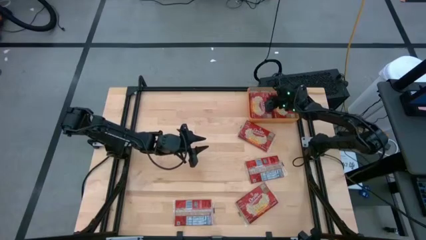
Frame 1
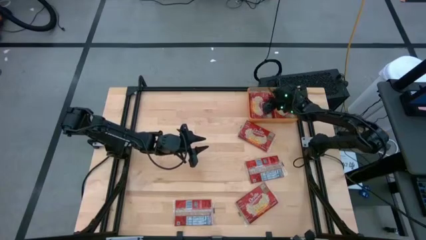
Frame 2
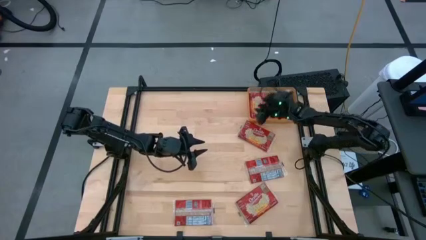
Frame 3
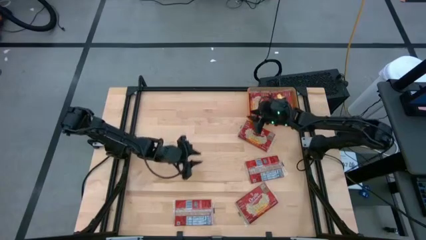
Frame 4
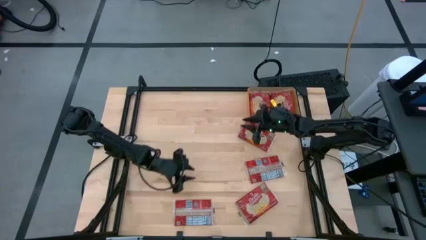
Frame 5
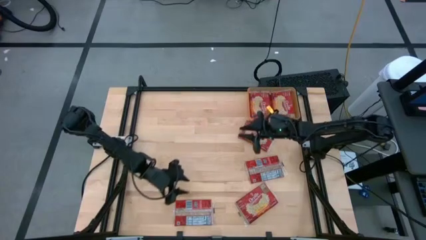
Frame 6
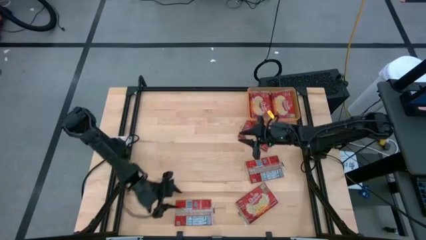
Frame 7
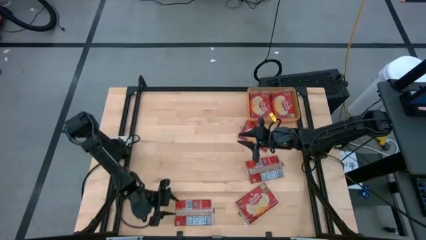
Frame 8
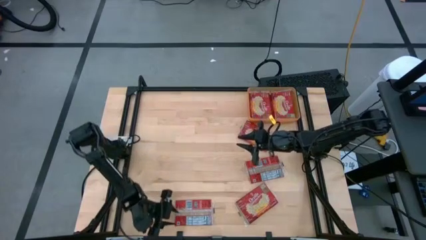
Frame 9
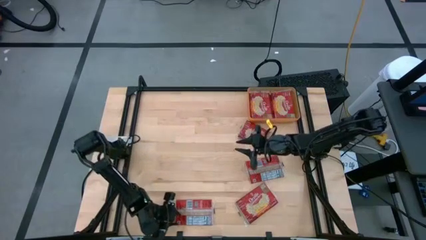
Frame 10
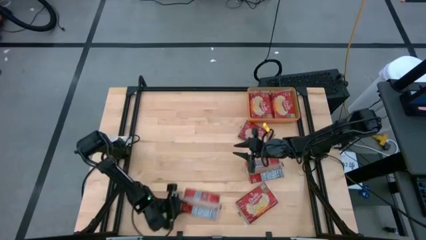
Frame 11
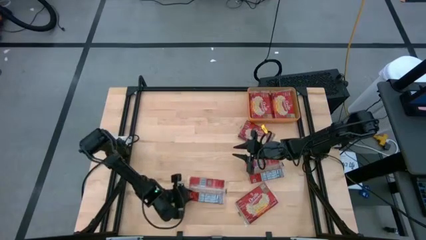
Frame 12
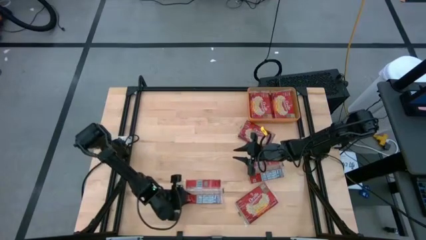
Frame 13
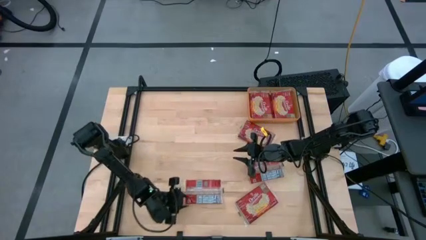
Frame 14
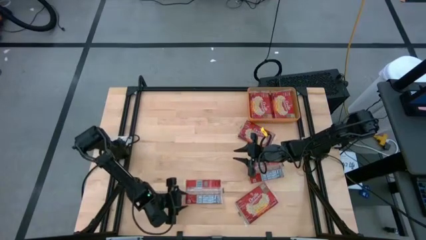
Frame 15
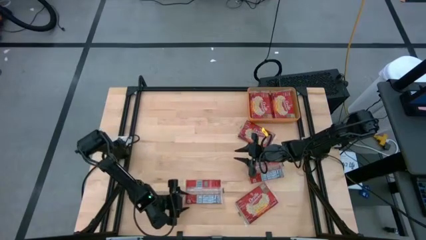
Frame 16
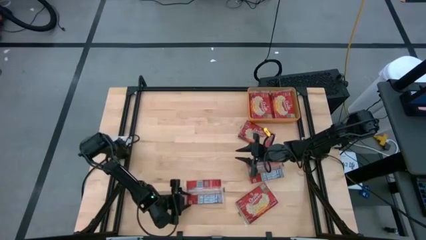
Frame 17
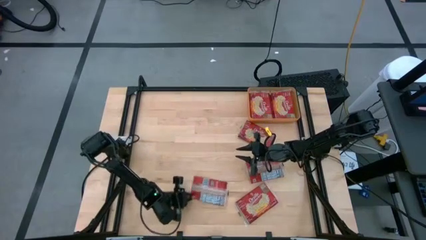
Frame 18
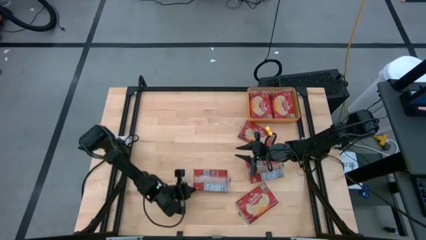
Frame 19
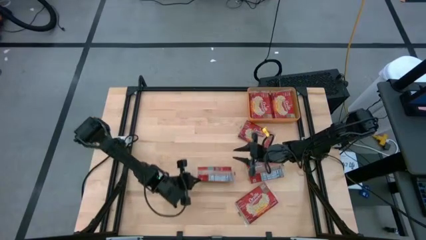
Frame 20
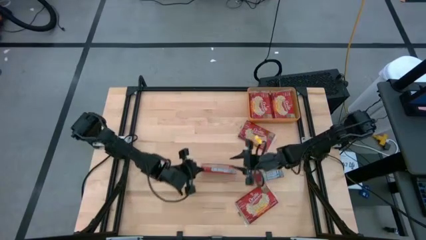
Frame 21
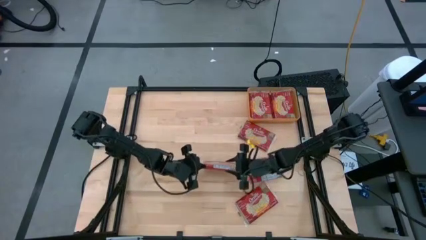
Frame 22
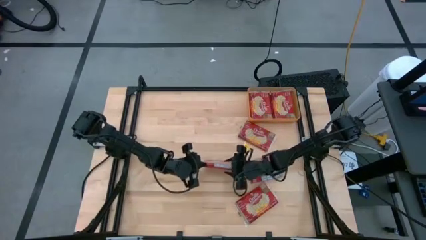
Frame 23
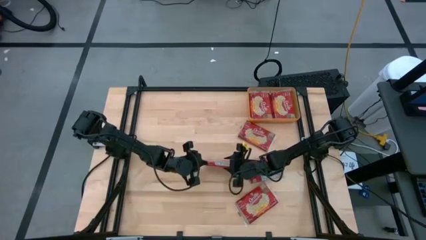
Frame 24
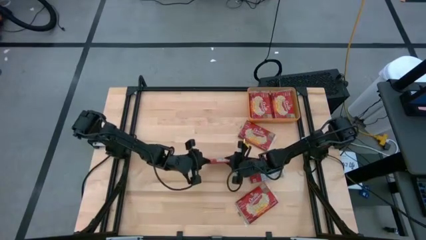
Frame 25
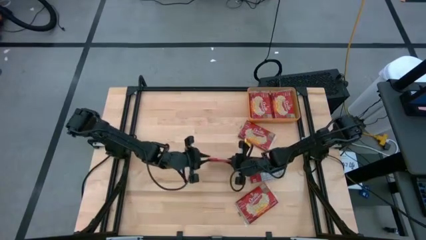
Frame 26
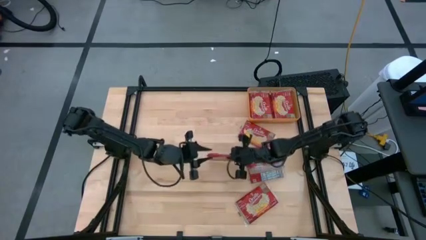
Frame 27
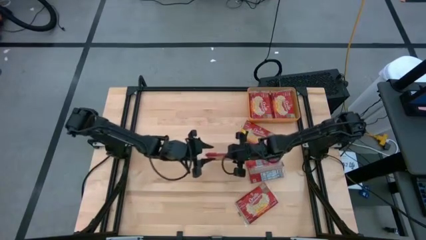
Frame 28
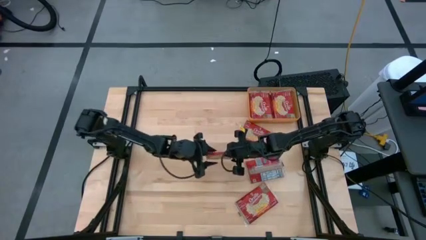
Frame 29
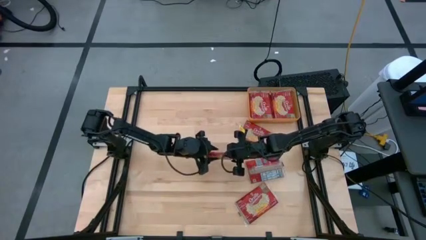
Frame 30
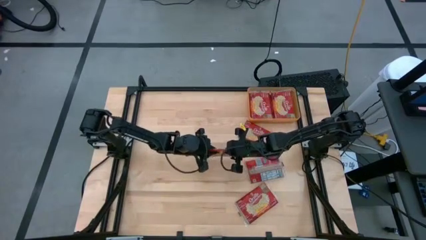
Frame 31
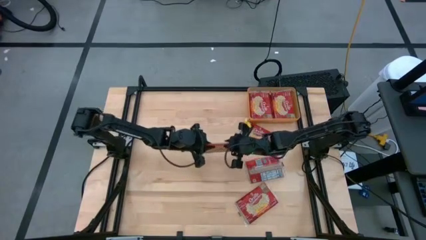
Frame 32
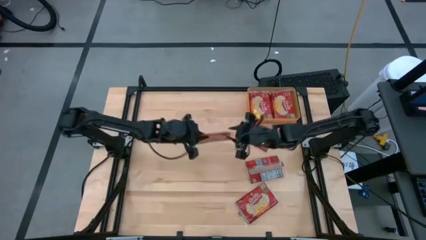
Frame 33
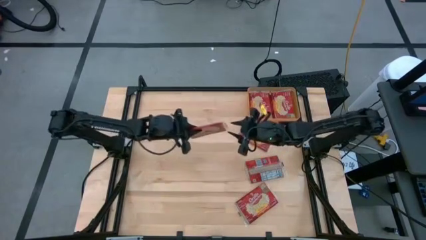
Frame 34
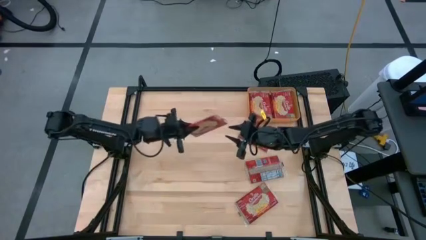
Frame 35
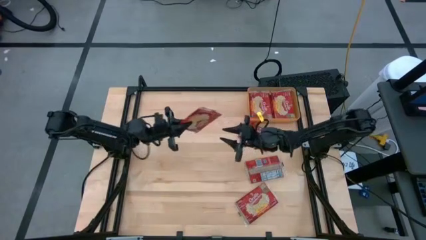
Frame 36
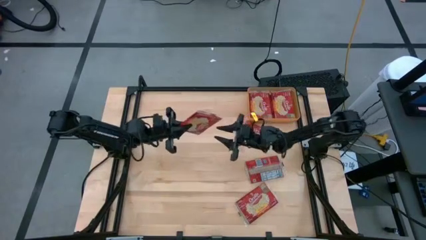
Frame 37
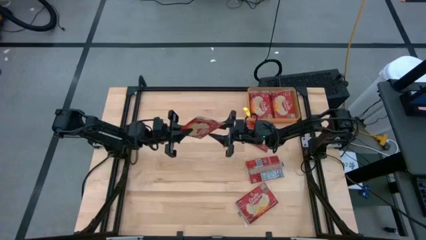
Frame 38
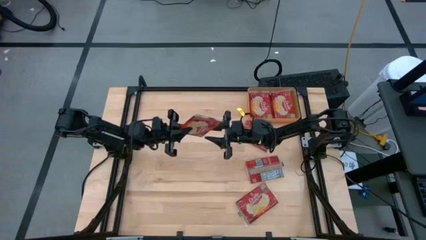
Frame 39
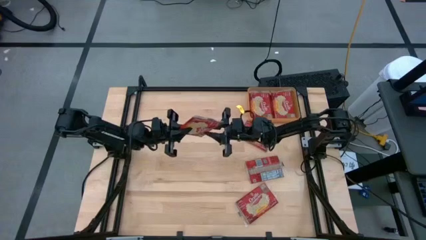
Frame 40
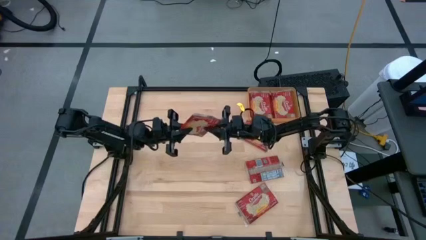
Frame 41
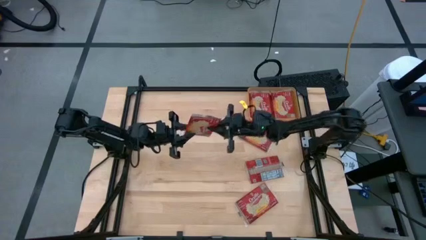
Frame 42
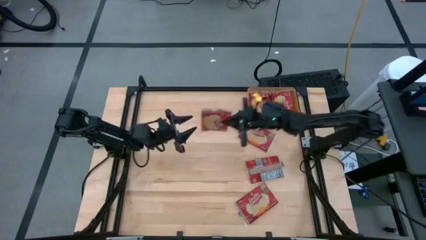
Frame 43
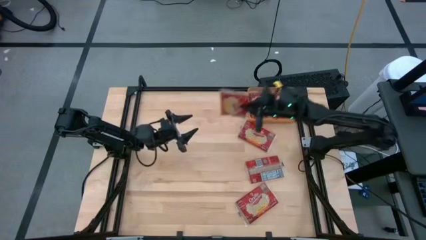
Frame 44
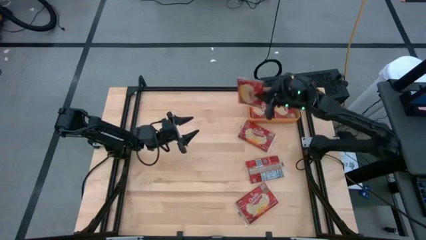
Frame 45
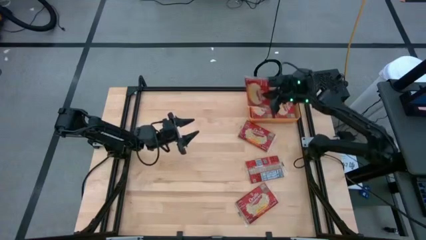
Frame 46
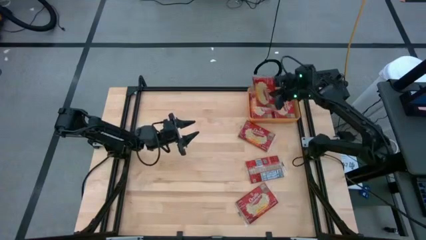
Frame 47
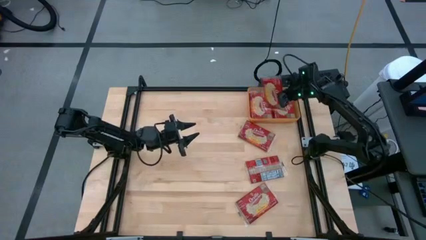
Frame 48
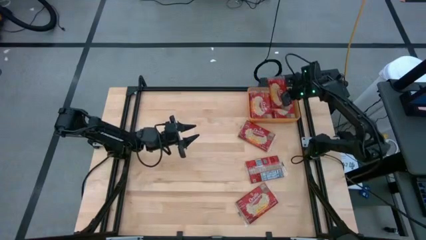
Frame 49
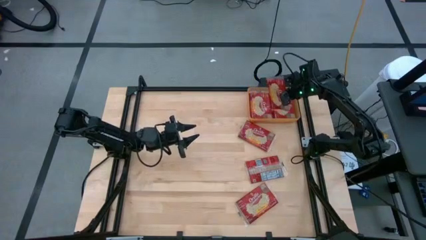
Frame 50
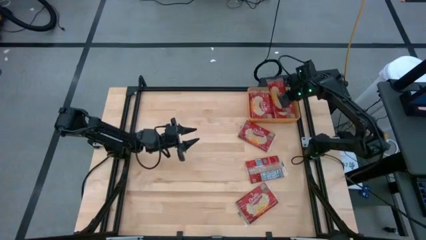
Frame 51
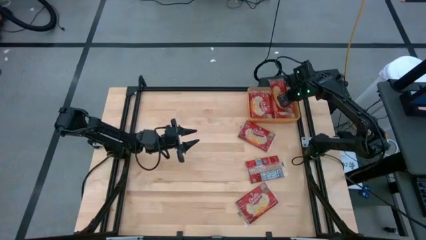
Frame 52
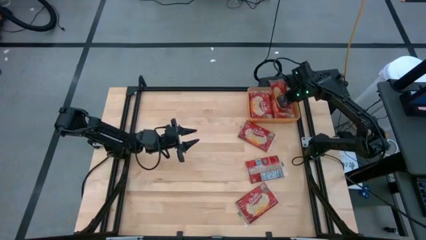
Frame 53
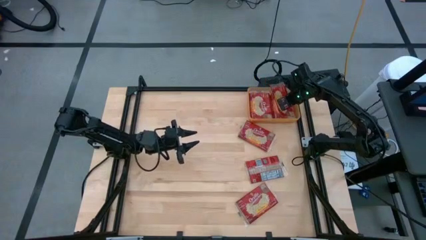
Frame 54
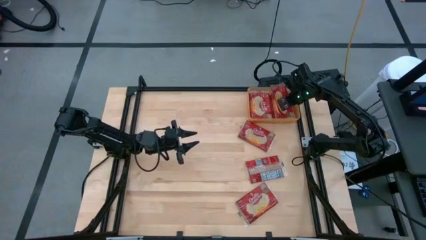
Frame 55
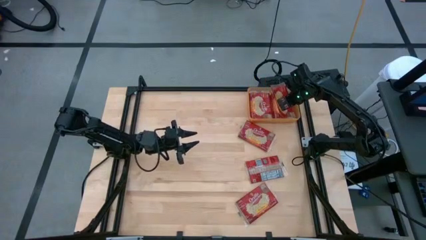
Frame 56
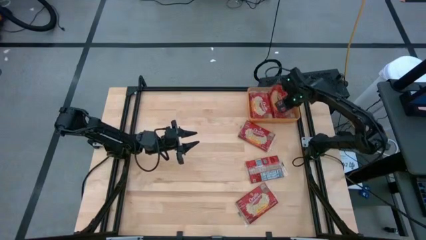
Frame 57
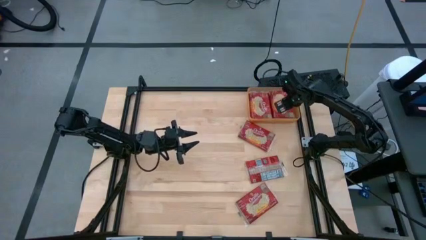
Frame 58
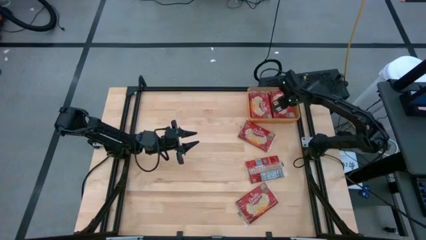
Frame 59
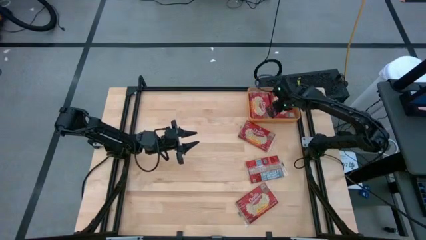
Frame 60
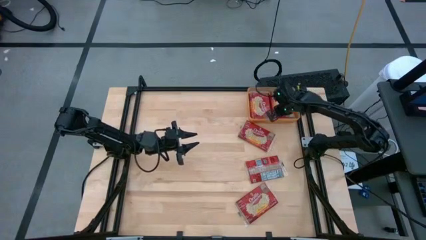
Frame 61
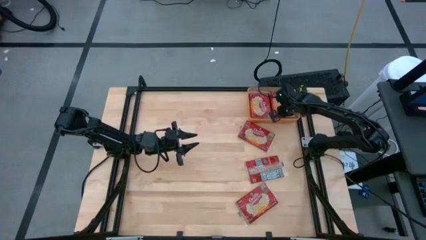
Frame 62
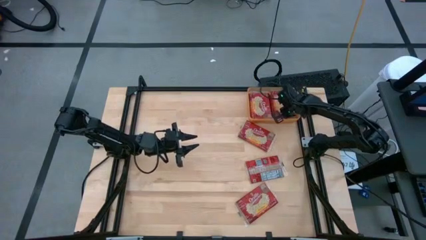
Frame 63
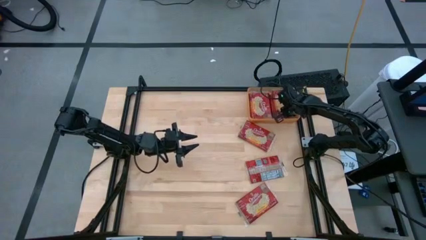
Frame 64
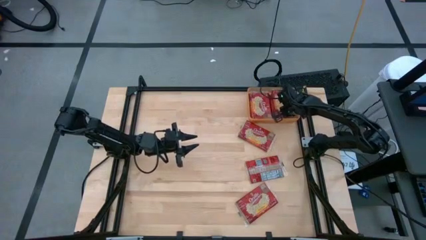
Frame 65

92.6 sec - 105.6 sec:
Task: Sort popcorn bags into baskets
Put the red popcorn bag into the orange bin

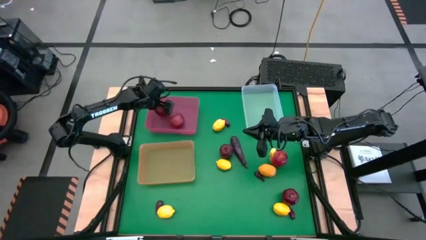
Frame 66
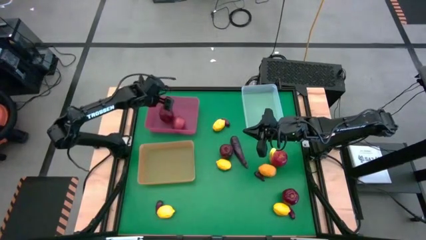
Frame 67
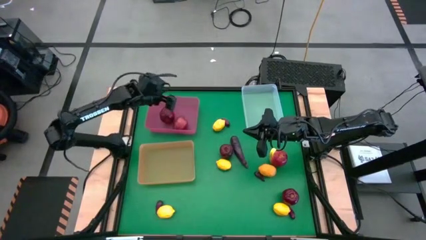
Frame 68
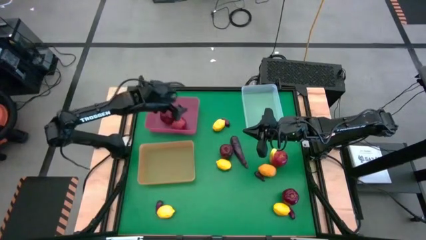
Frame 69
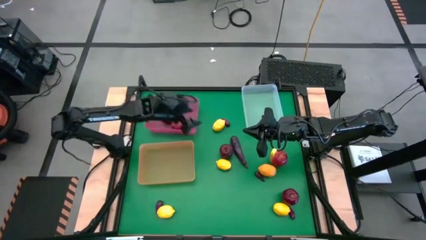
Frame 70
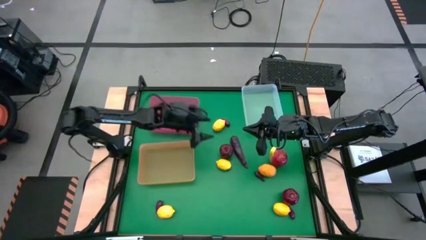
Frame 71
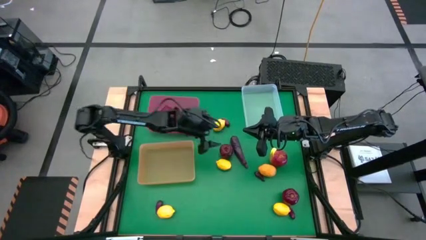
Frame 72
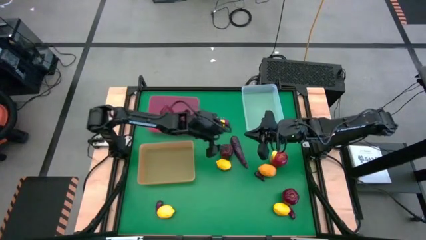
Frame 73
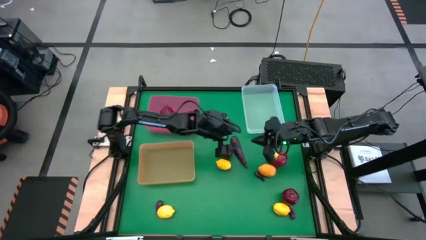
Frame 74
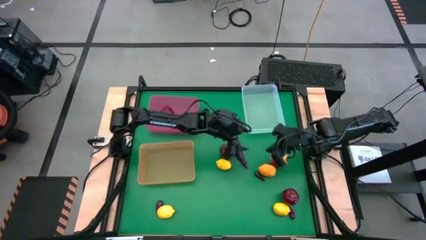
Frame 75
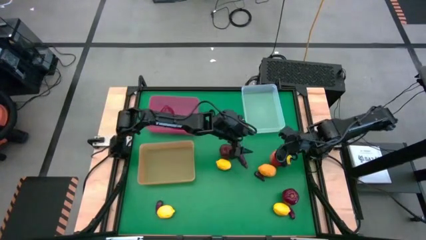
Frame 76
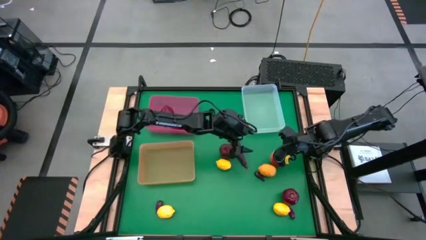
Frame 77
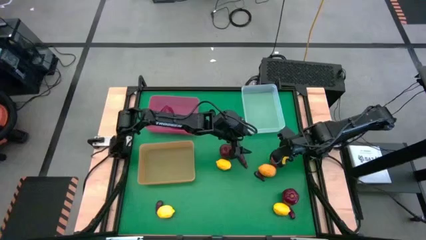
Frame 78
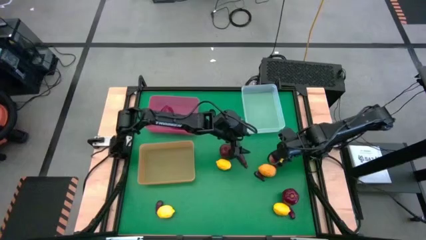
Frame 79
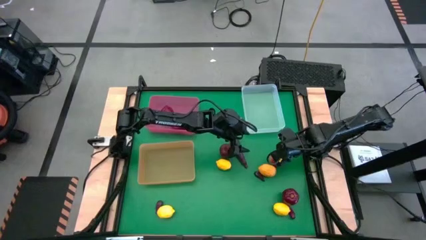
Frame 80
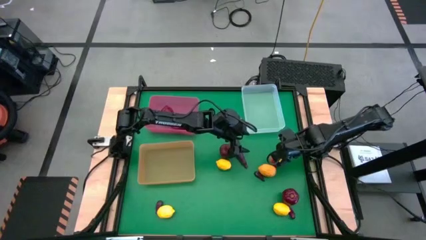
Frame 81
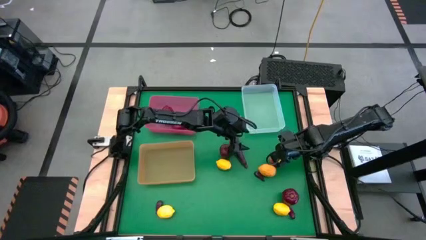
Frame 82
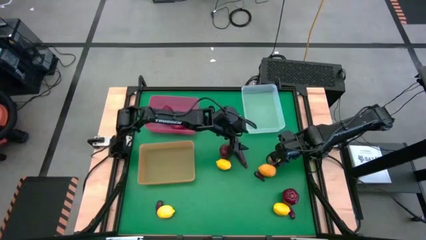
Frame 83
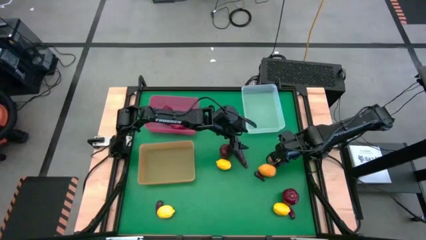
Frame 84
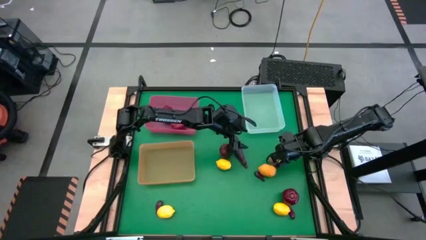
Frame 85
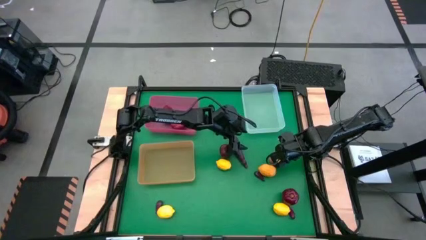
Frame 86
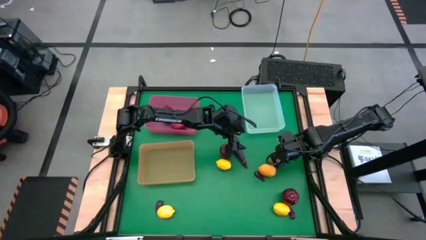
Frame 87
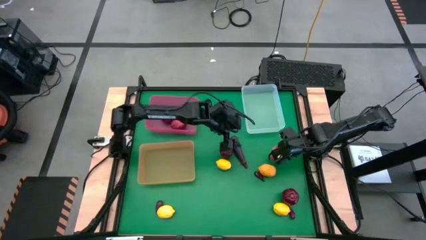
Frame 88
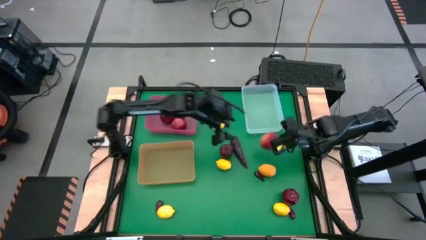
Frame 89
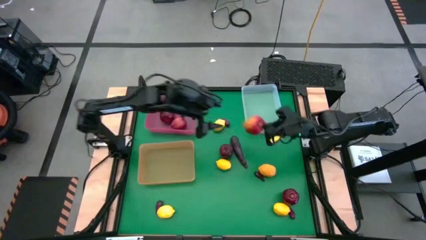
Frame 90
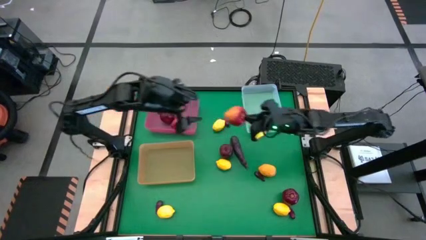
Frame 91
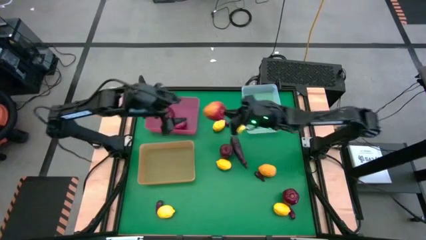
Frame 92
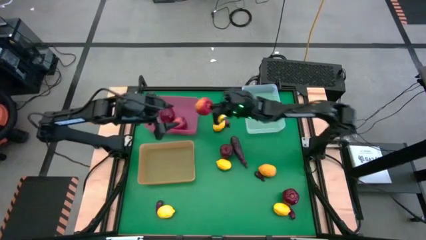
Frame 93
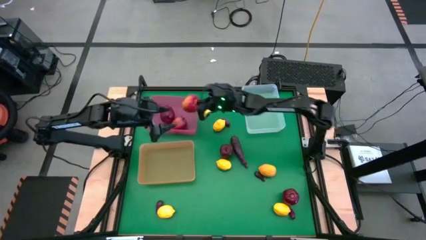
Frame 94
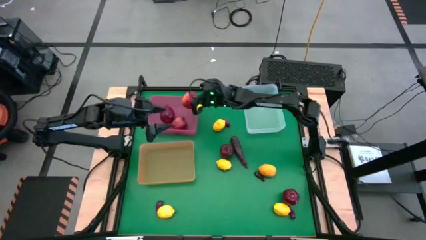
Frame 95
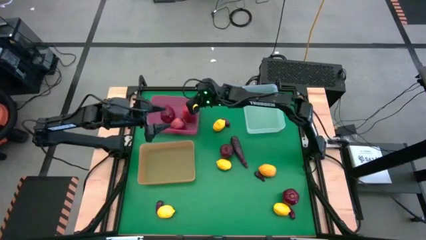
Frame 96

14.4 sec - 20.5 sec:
Task: Sort produce into baskets
Put the apple into the pink bin
